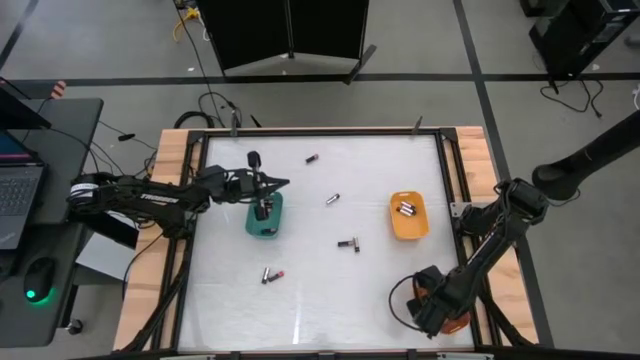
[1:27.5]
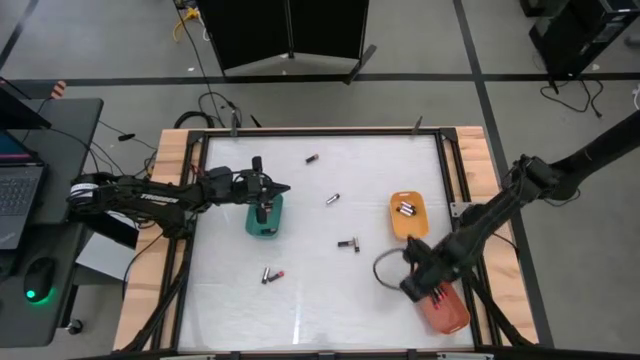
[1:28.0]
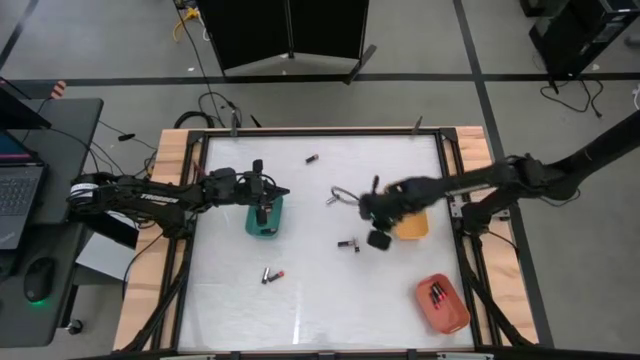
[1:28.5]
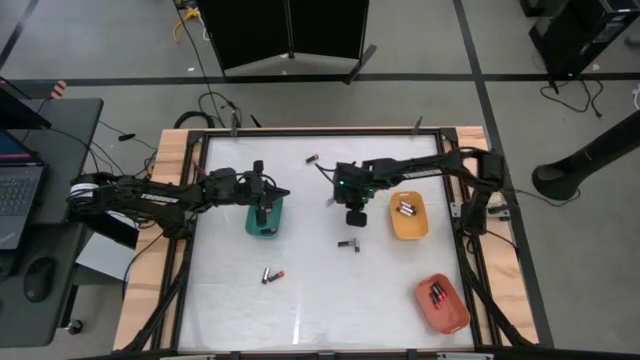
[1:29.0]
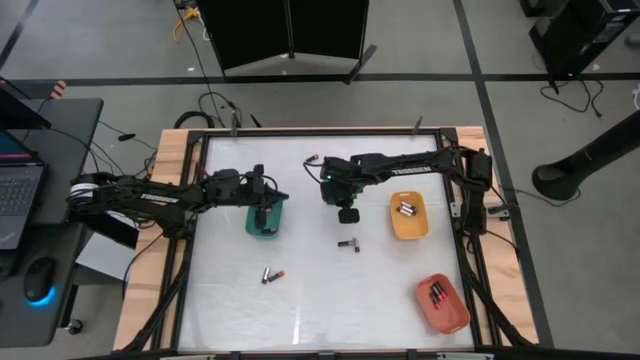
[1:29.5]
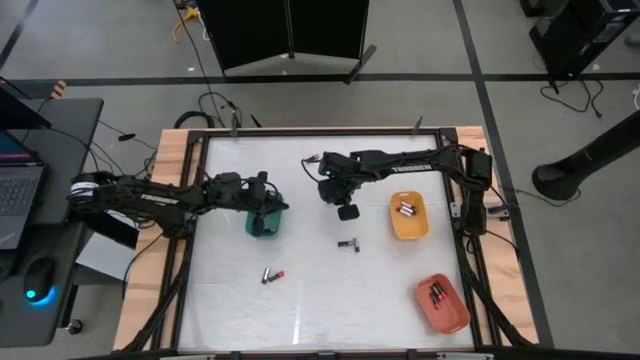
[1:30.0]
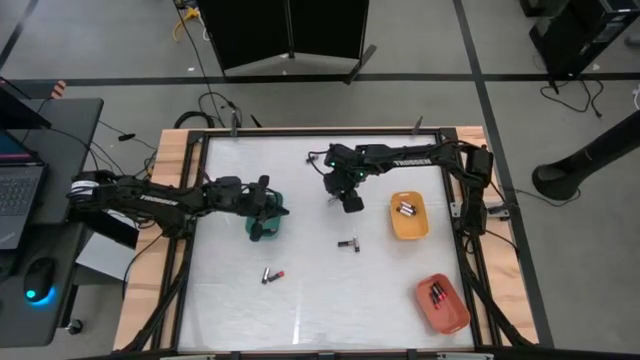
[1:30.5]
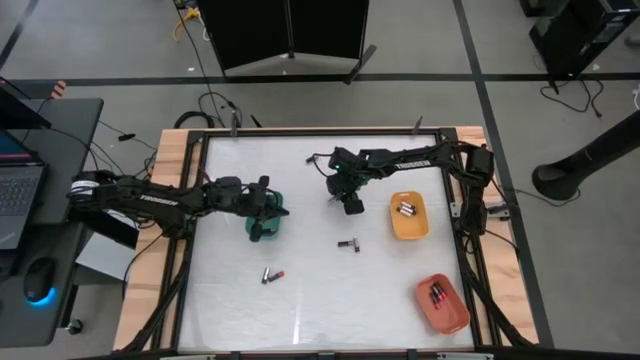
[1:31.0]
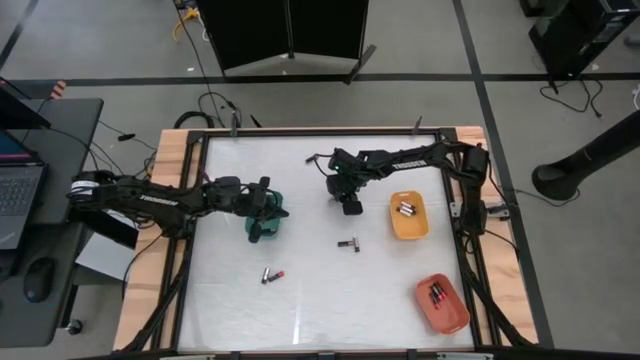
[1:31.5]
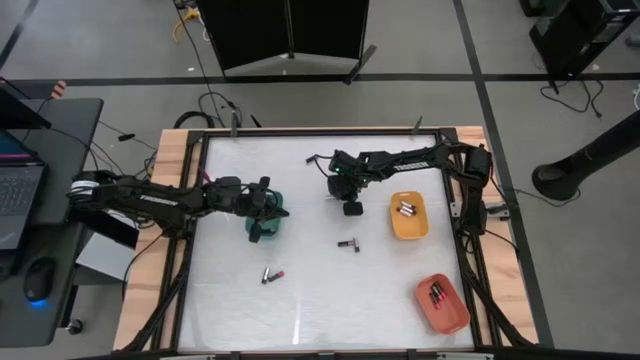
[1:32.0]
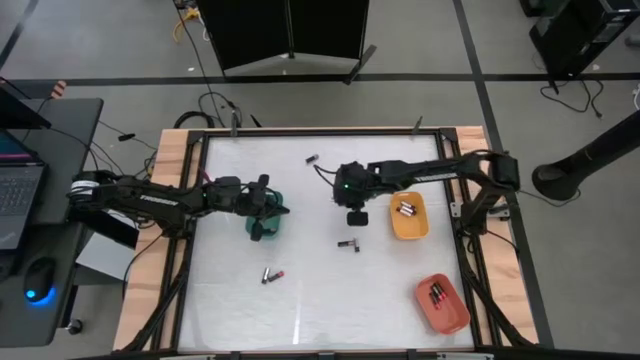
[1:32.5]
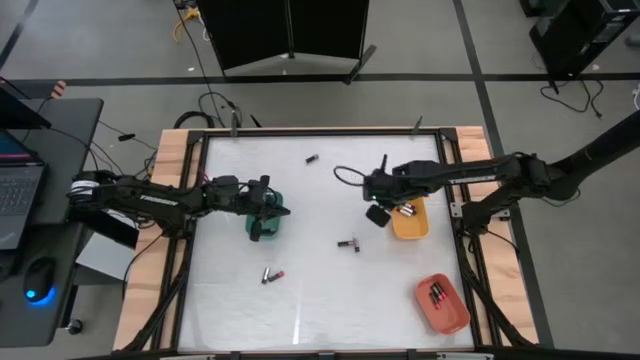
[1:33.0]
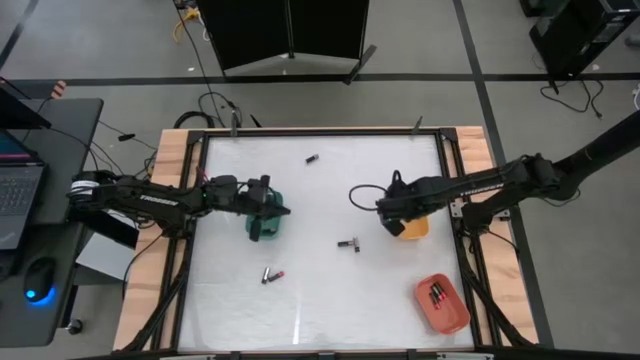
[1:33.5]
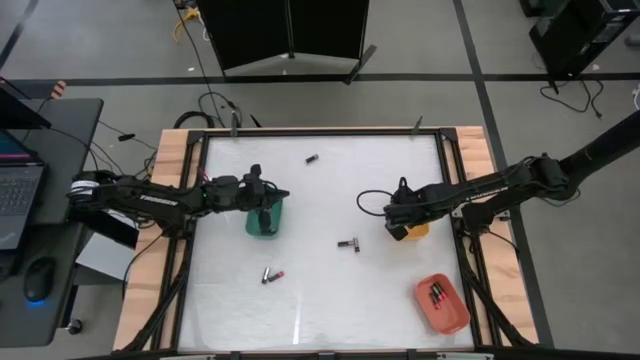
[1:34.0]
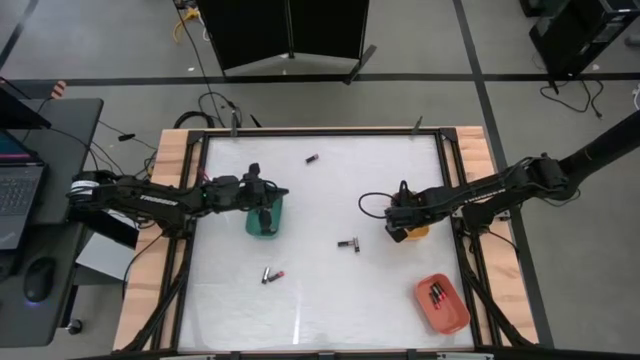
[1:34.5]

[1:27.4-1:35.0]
Task: Sort batteries
Put the silver battery into the yellow bin

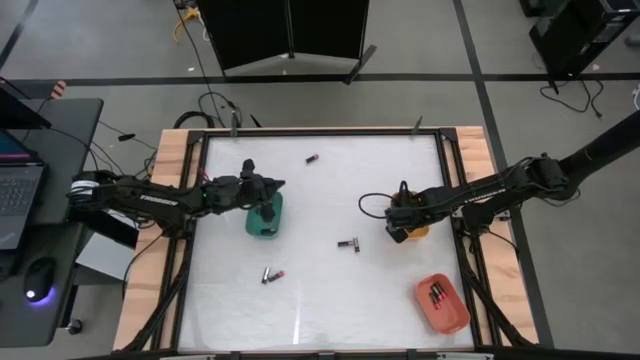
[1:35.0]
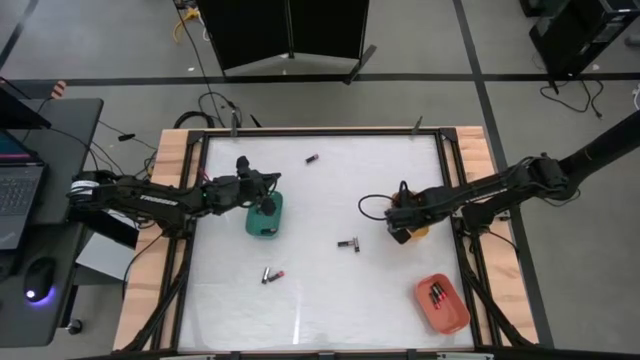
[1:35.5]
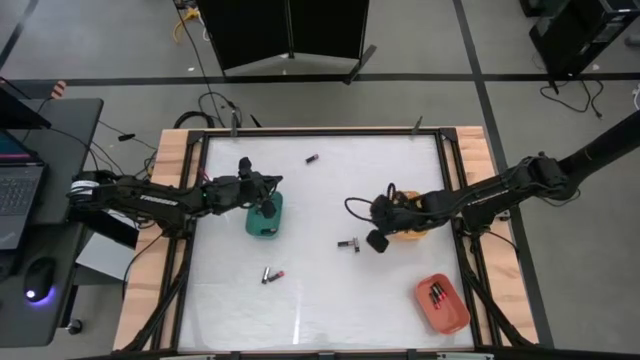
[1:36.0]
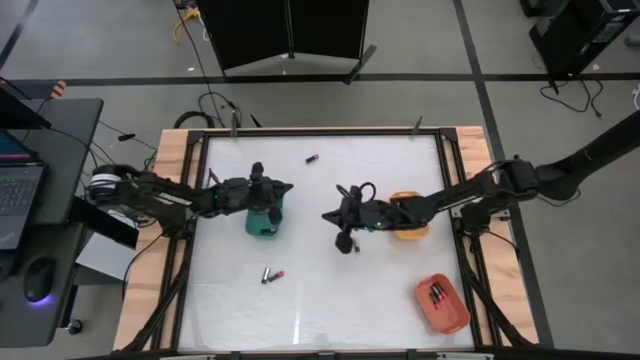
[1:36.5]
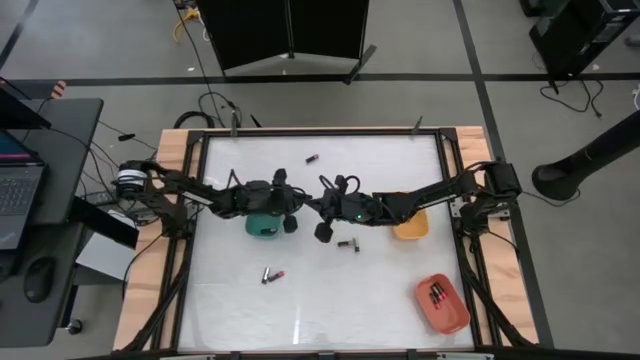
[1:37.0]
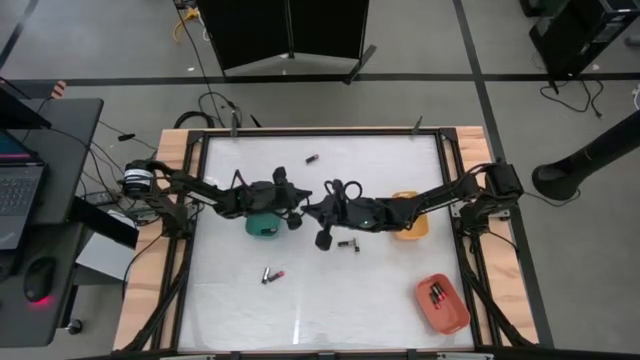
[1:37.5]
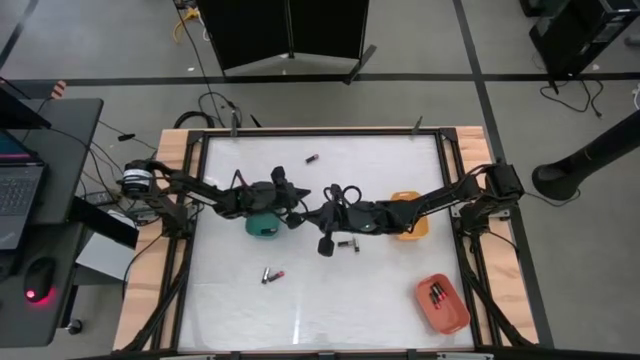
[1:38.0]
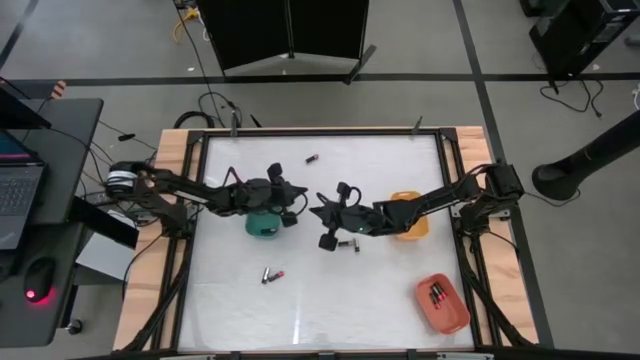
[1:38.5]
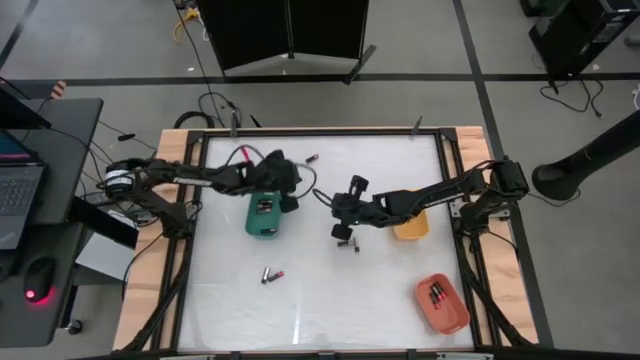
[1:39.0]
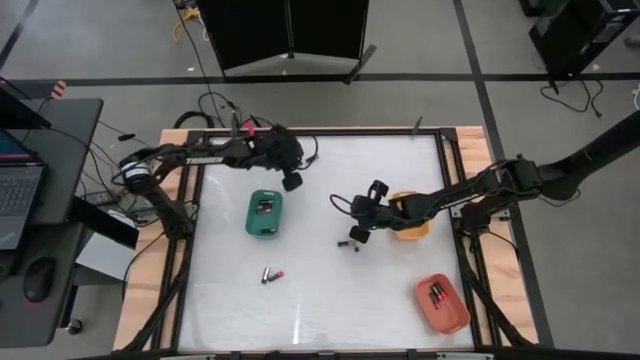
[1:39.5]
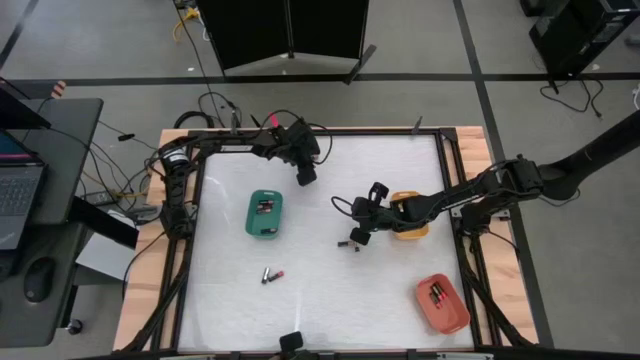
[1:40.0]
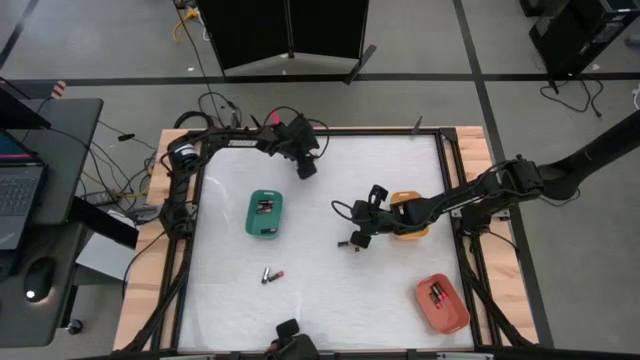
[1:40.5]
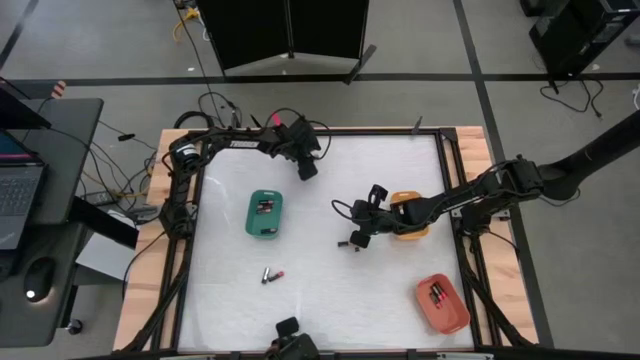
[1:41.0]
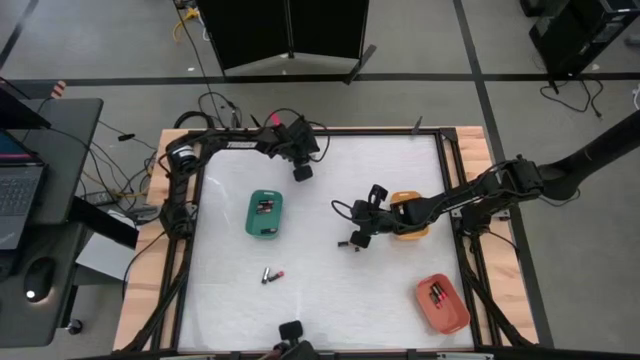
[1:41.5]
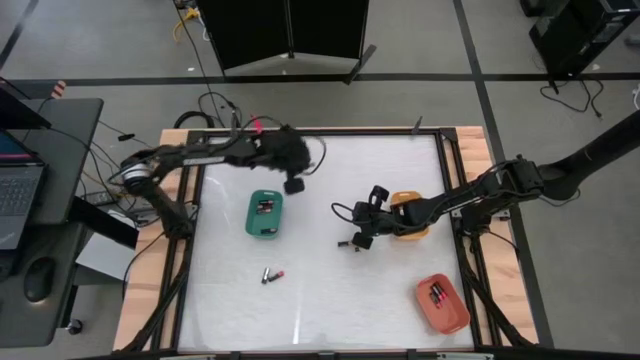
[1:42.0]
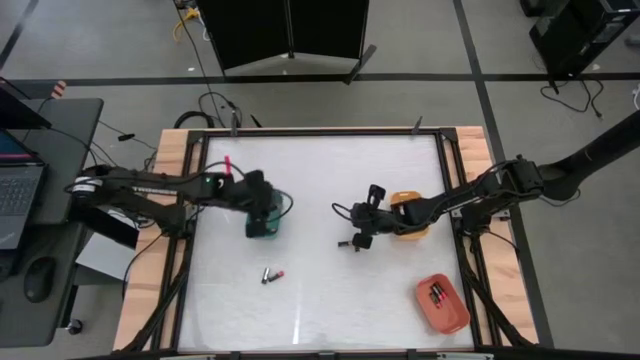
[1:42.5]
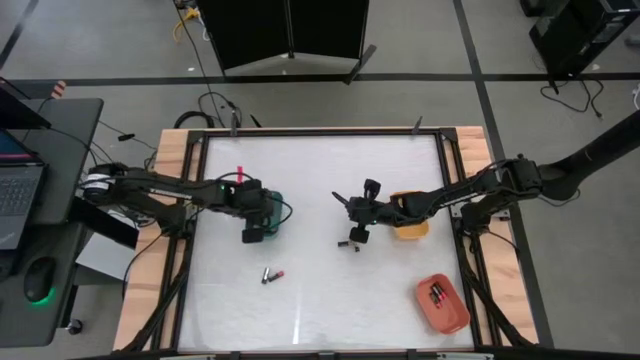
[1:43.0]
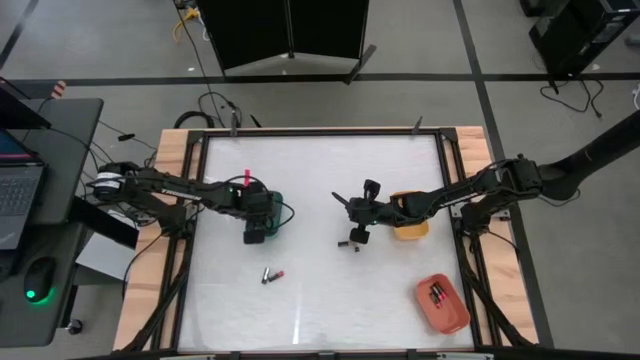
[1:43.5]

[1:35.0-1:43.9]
Put the black and copper battery into the green bin

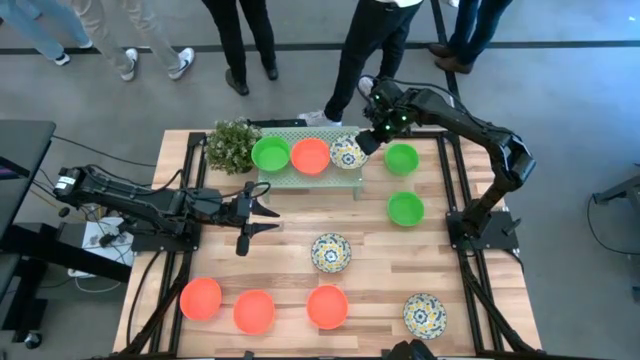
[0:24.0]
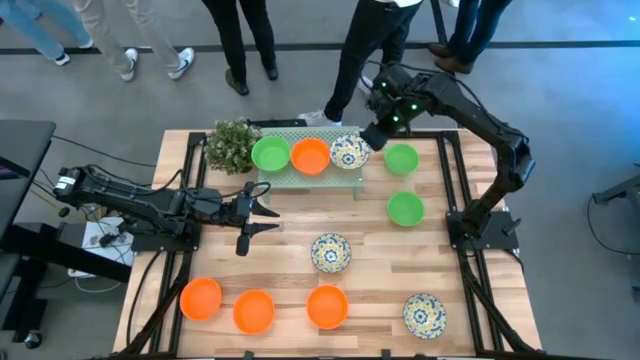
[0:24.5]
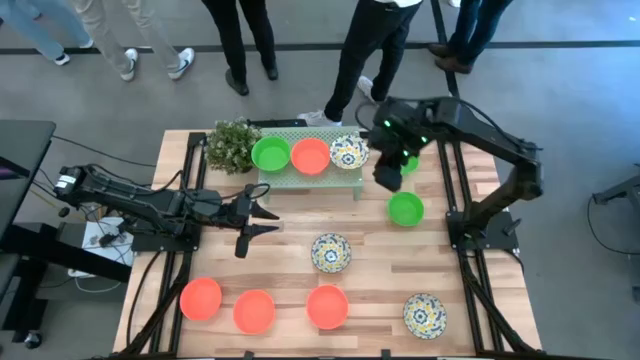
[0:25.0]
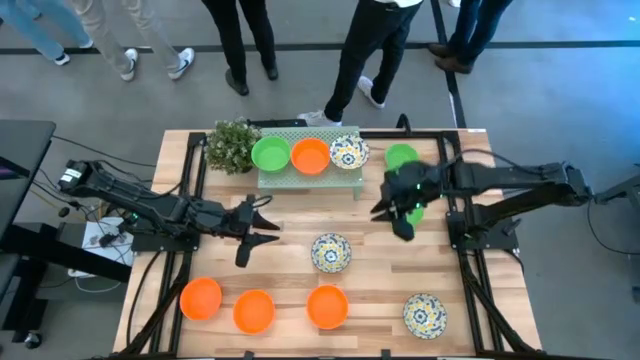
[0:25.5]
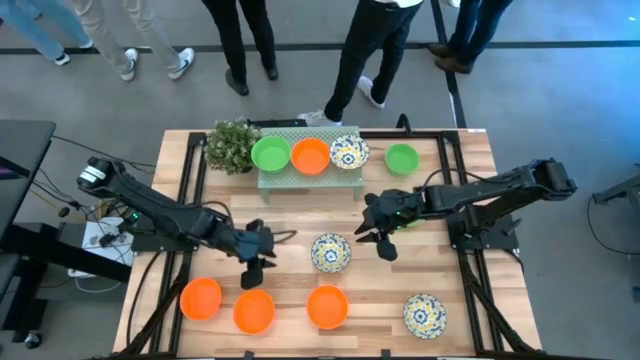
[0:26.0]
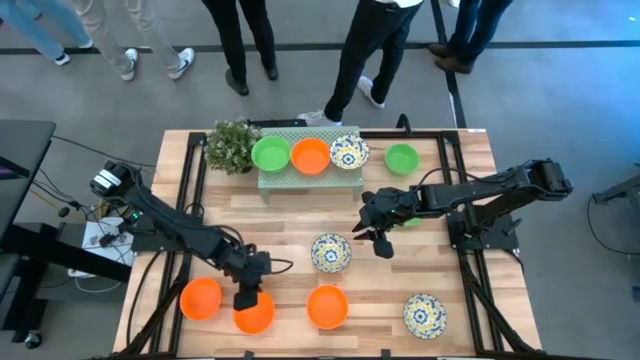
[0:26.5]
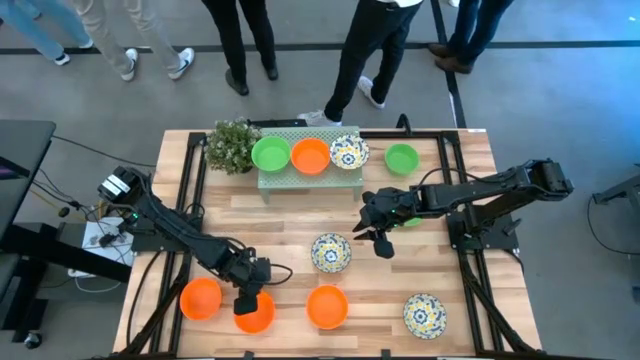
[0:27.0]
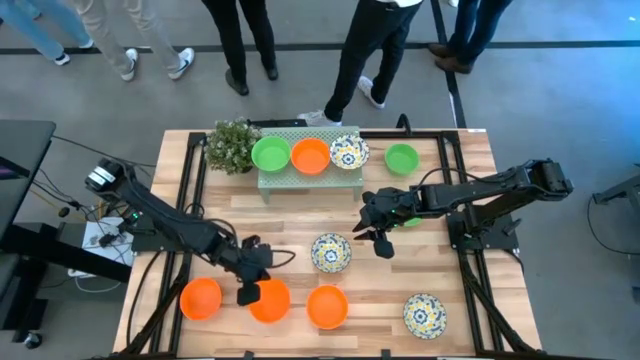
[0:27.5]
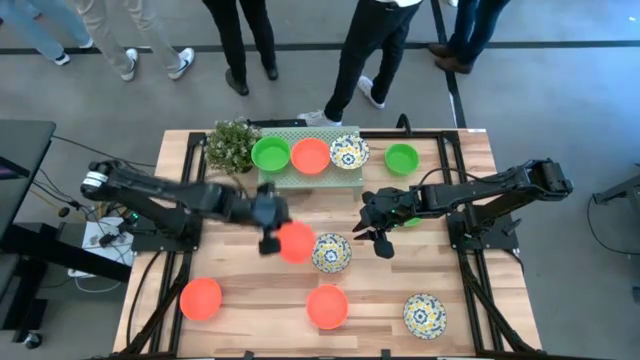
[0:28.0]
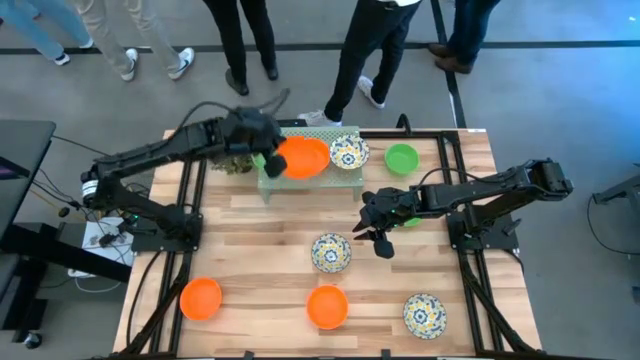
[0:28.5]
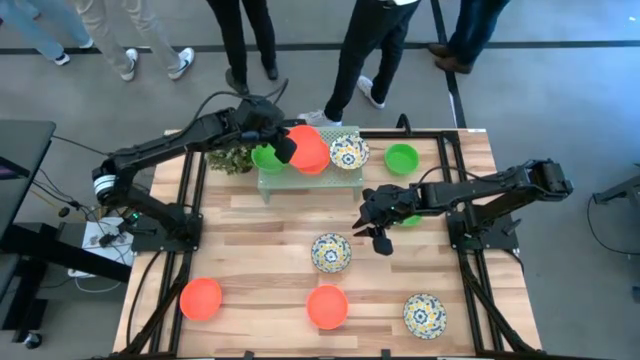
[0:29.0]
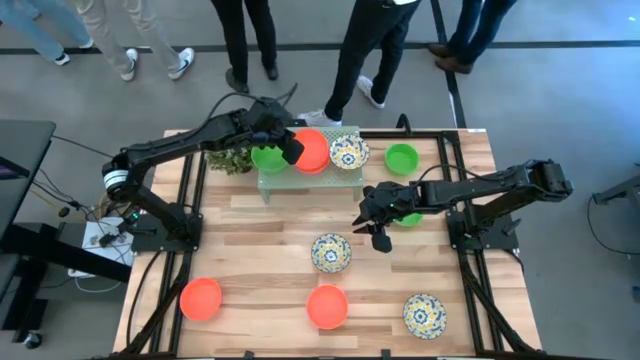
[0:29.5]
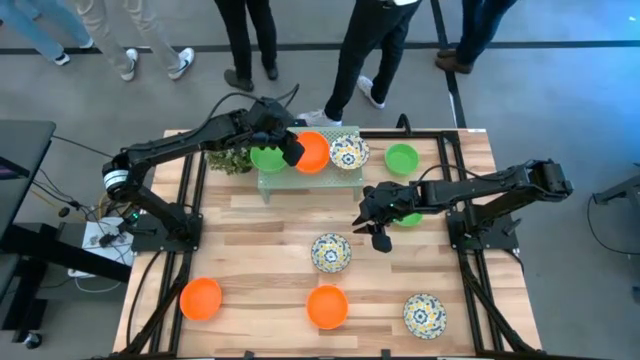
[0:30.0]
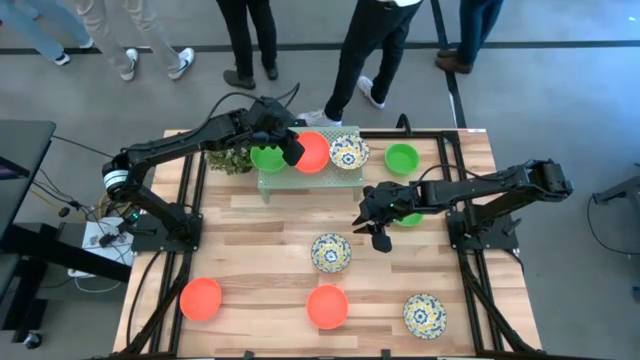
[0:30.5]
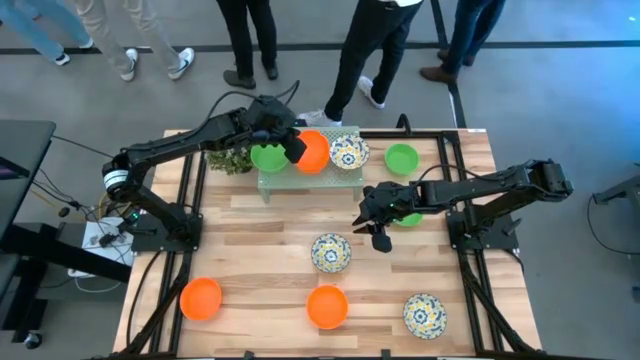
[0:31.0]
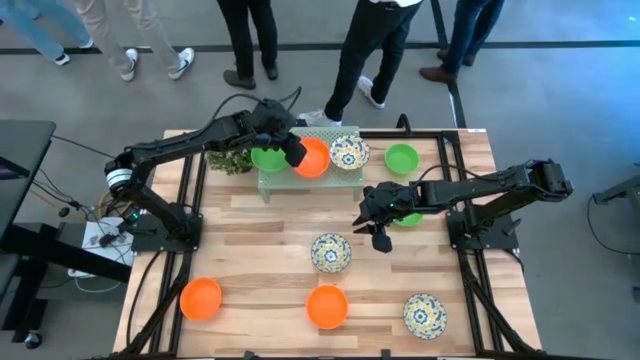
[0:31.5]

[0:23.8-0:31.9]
Task: Pick & Place Mini bowls
Stack the orange bowl on top of the orange bowl on the shelf
